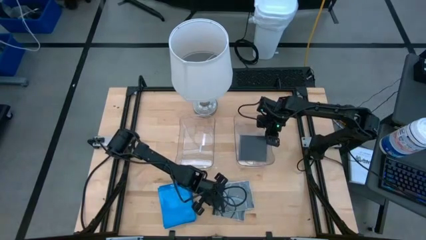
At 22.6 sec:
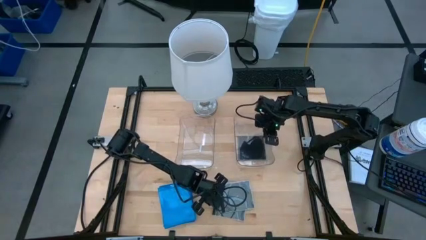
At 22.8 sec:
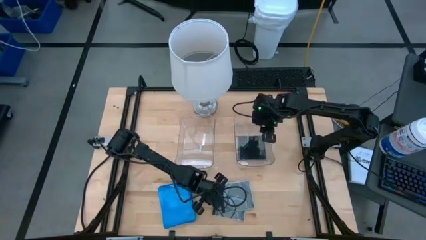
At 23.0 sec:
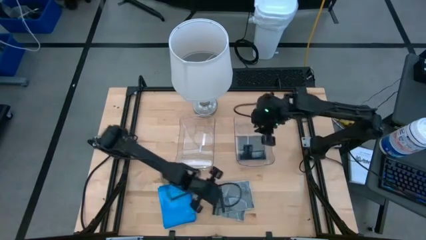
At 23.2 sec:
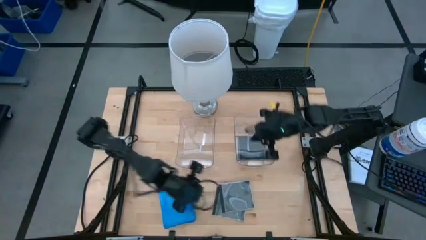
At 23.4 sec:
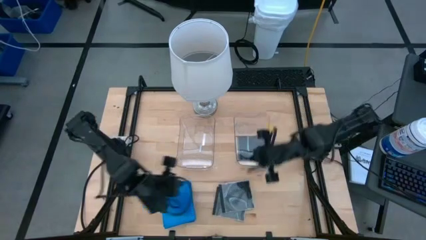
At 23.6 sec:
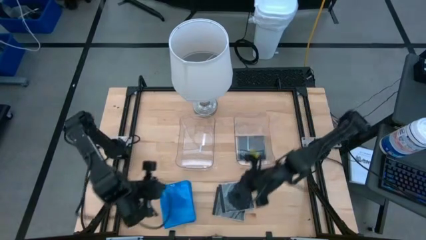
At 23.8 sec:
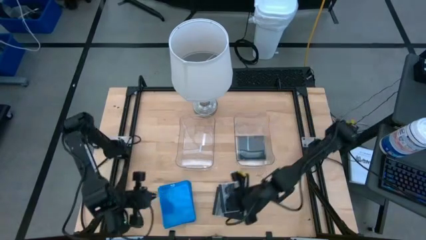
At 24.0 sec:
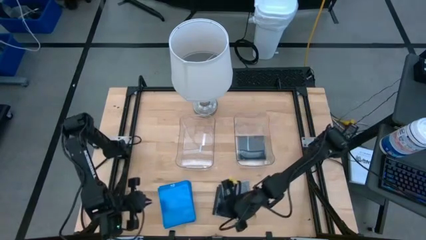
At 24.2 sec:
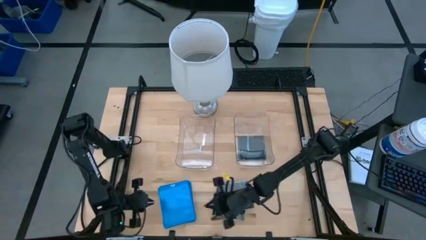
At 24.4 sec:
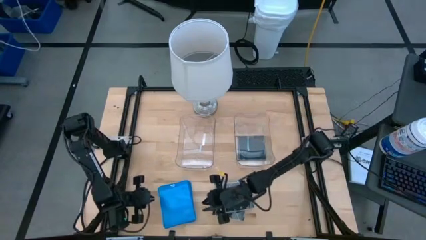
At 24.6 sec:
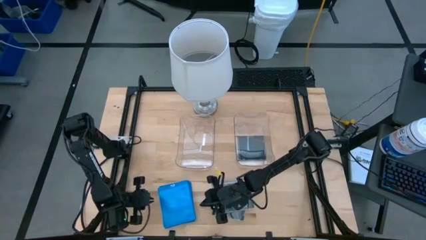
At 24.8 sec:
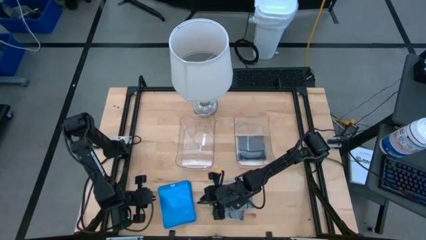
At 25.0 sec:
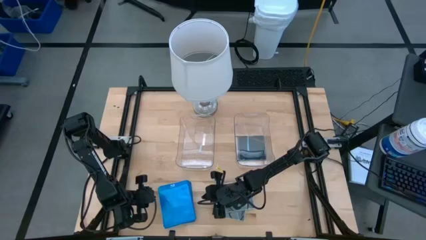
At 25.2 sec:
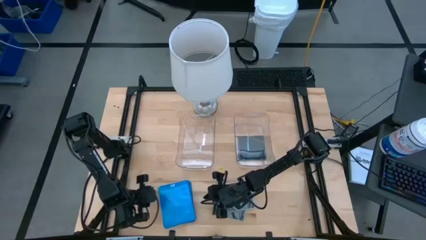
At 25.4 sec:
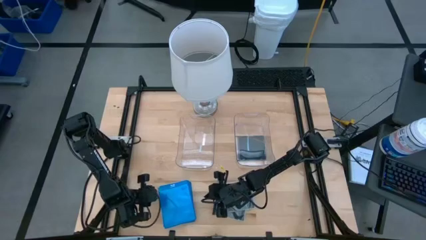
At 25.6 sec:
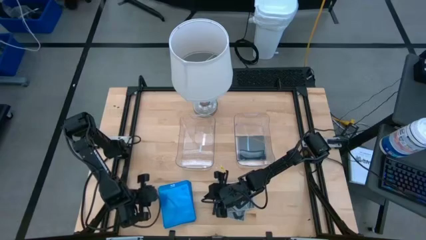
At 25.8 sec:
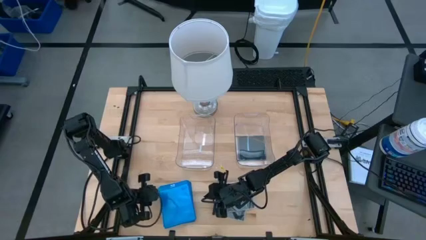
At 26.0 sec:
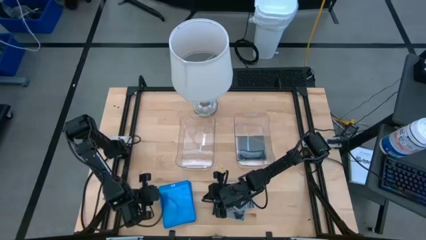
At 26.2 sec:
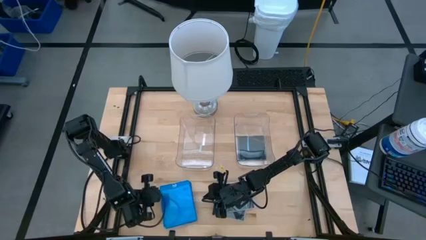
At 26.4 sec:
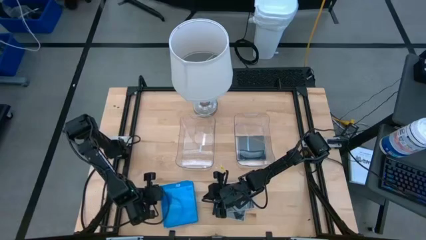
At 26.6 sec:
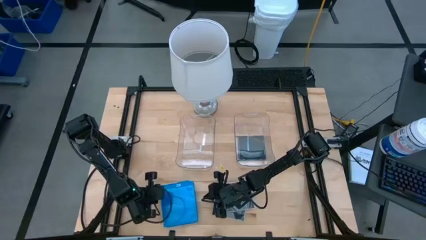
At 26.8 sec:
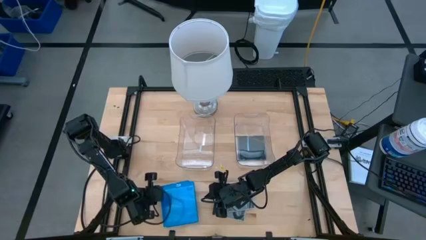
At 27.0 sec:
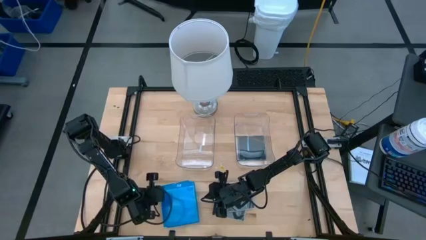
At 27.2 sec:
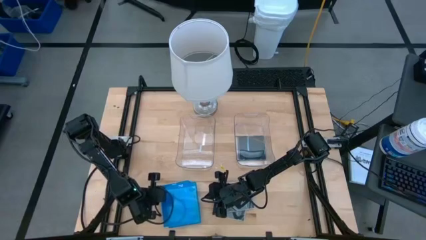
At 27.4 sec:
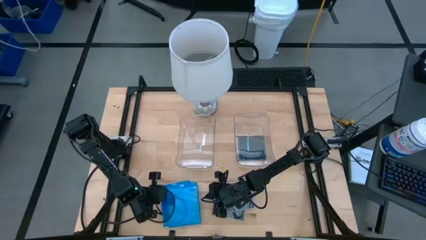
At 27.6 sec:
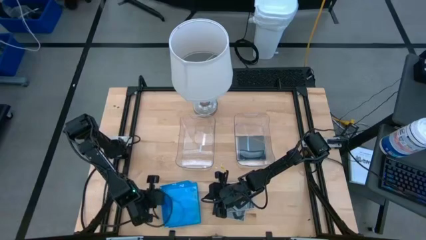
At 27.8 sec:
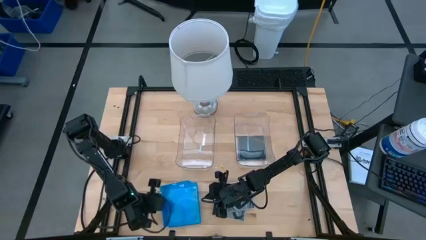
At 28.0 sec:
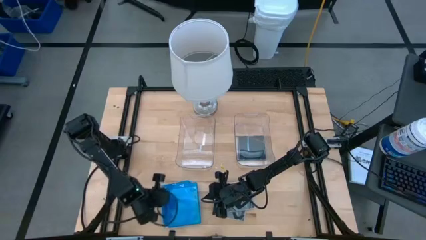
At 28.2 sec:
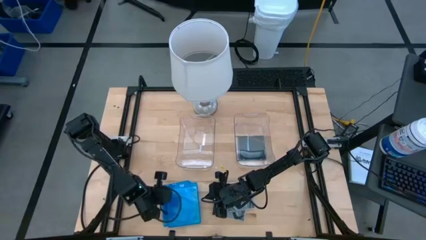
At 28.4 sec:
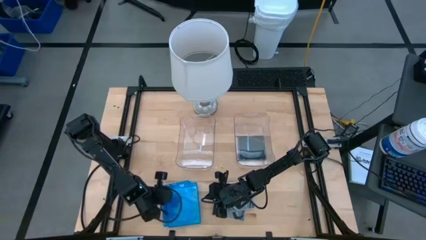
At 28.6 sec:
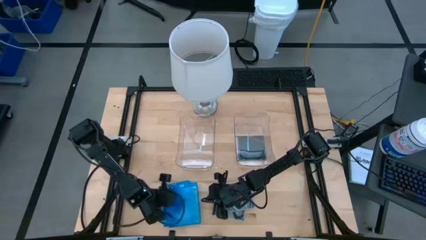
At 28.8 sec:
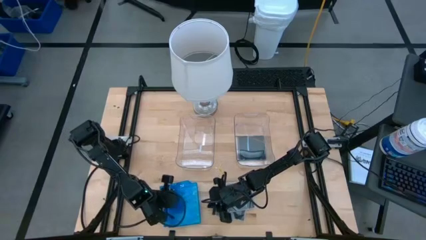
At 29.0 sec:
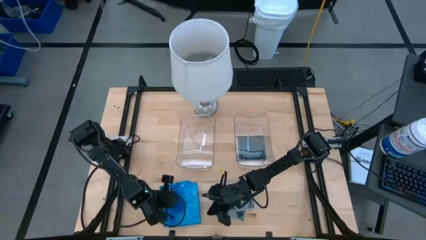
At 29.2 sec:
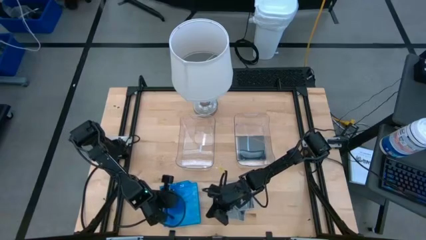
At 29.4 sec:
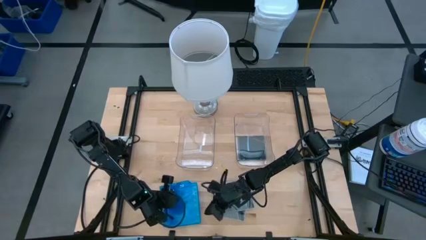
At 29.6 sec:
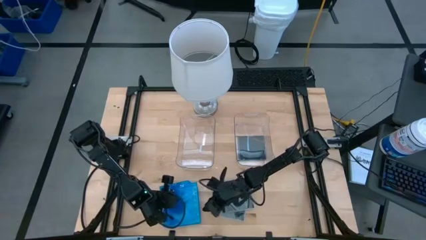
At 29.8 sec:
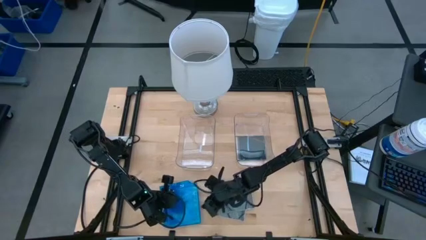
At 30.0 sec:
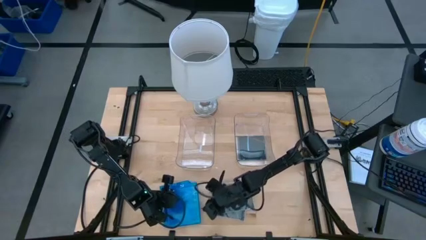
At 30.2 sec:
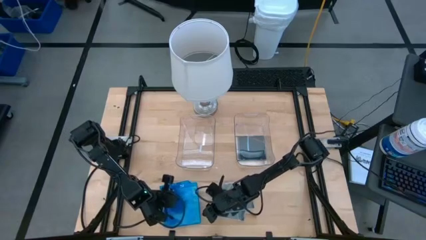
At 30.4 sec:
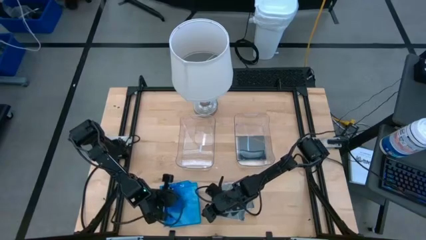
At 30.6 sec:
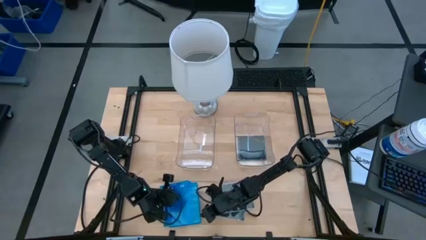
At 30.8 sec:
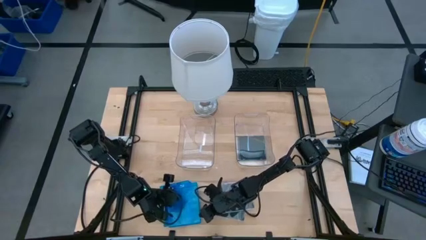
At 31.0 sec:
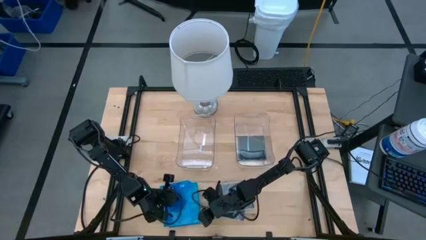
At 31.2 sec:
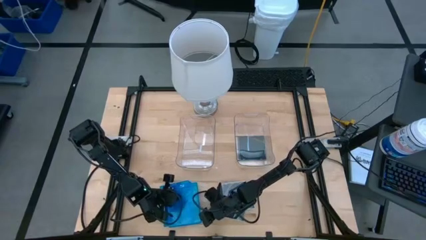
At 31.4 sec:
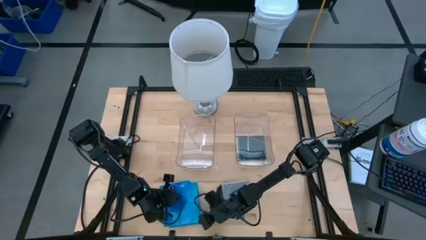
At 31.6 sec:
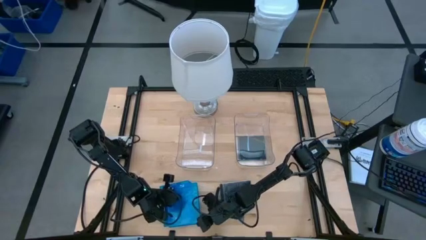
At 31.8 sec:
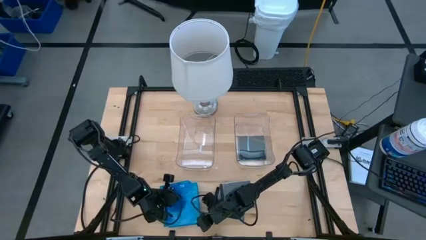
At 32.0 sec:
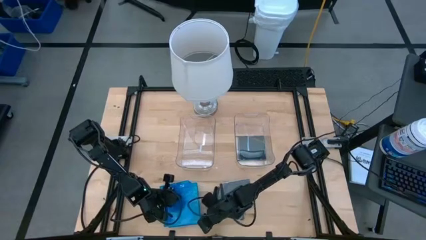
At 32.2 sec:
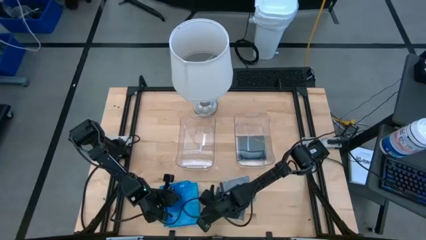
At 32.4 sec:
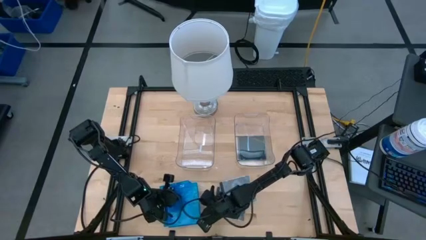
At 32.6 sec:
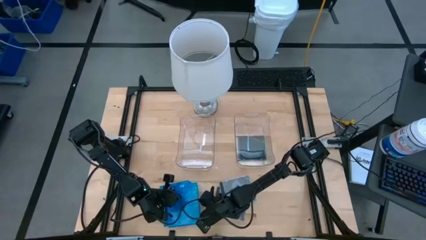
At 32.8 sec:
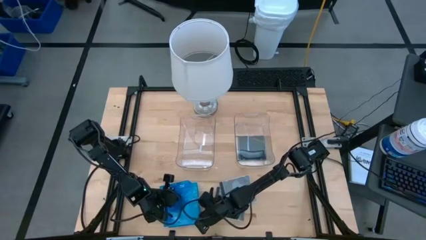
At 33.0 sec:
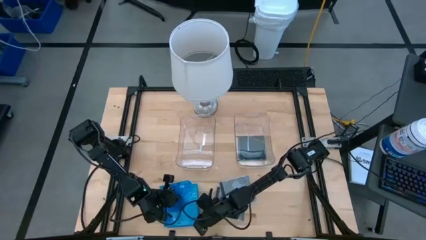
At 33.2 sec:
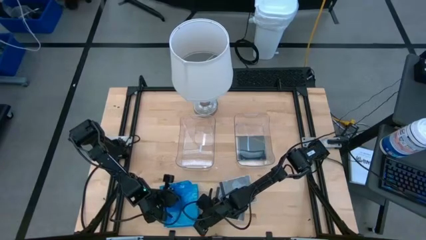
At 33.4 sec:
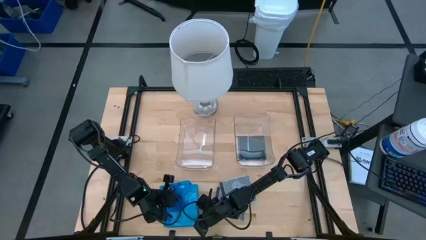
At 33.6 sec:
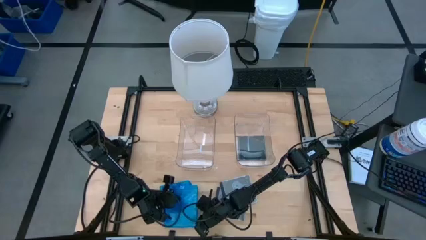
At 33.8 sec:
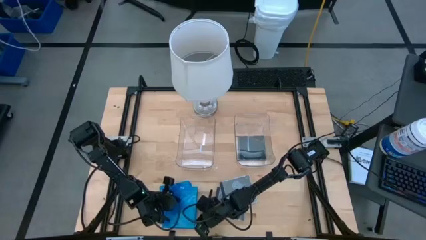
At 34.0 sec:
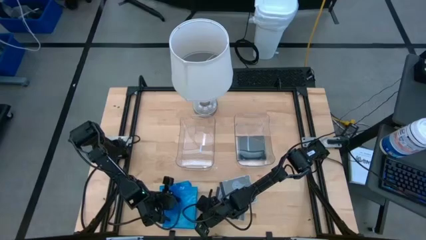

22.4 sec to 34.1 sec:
Task: Pick & place jewel cases by type
Put the blue CD case into the left transparent bin

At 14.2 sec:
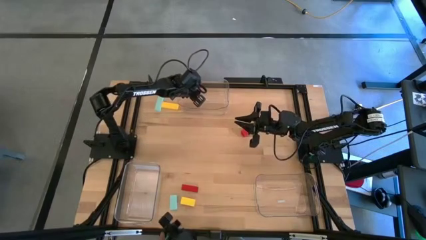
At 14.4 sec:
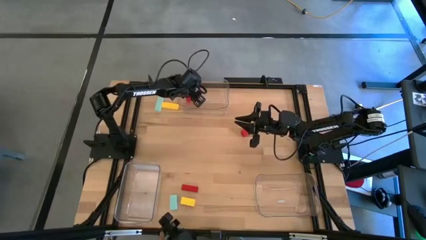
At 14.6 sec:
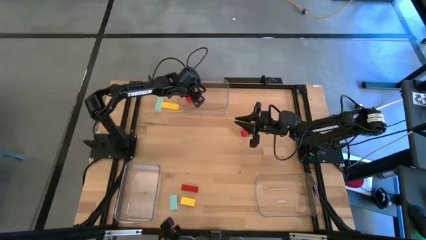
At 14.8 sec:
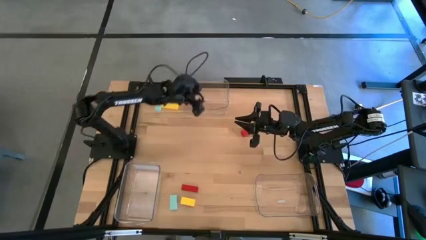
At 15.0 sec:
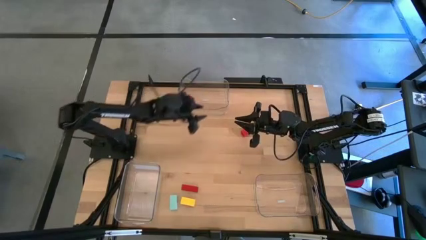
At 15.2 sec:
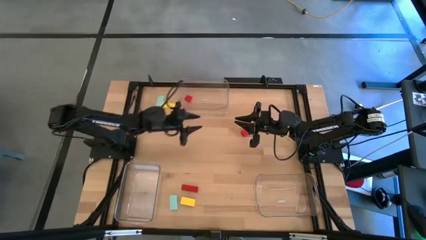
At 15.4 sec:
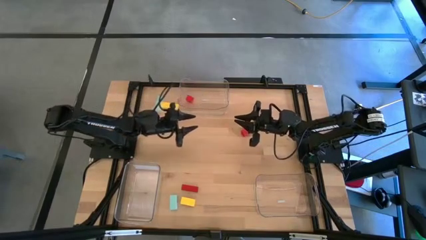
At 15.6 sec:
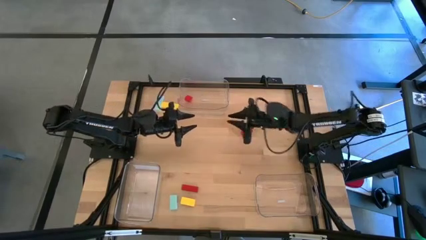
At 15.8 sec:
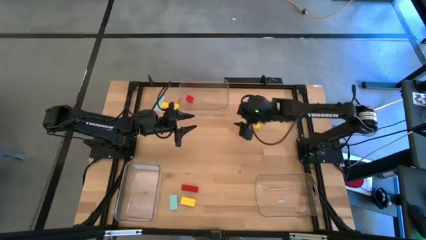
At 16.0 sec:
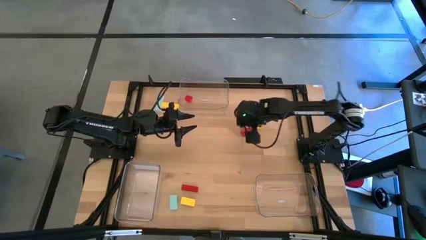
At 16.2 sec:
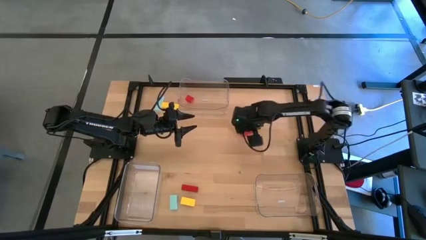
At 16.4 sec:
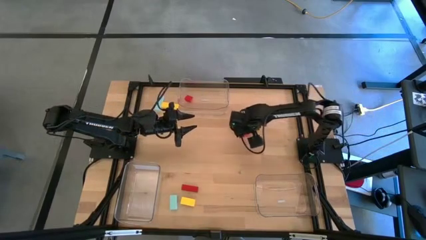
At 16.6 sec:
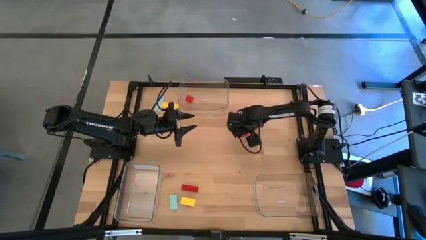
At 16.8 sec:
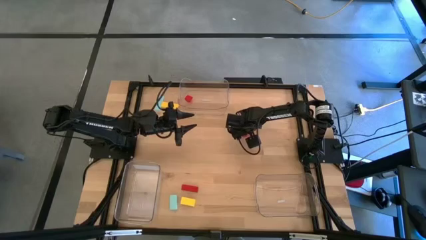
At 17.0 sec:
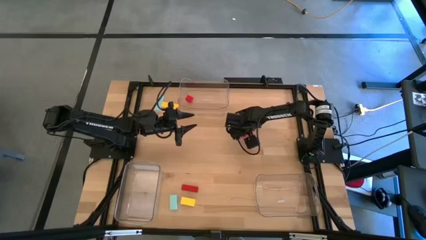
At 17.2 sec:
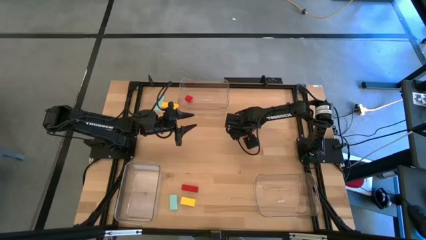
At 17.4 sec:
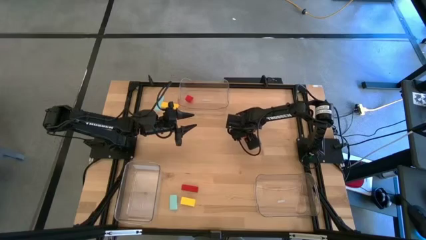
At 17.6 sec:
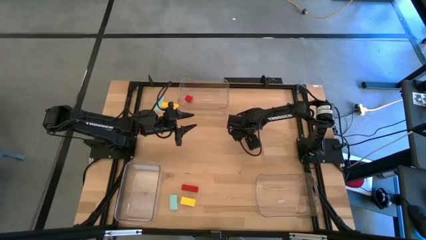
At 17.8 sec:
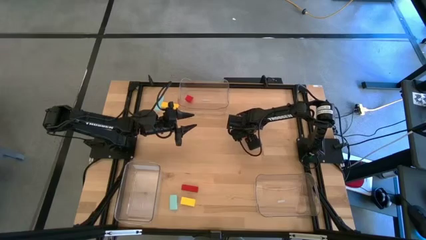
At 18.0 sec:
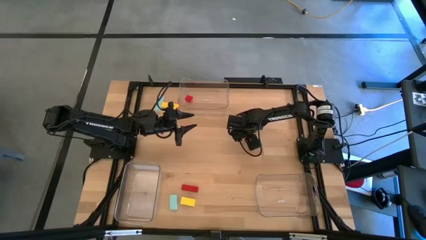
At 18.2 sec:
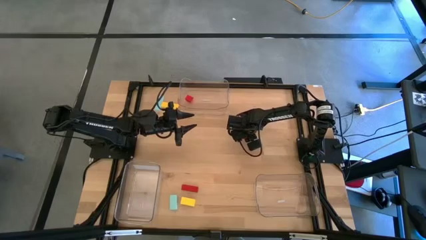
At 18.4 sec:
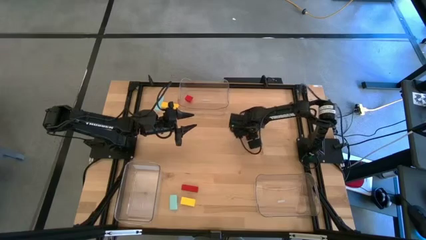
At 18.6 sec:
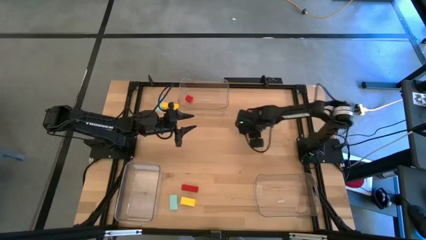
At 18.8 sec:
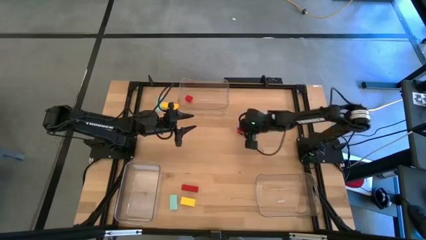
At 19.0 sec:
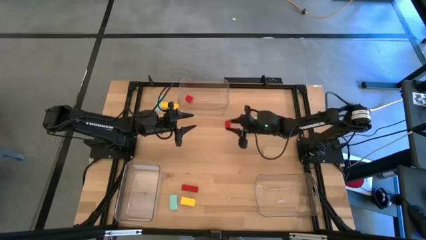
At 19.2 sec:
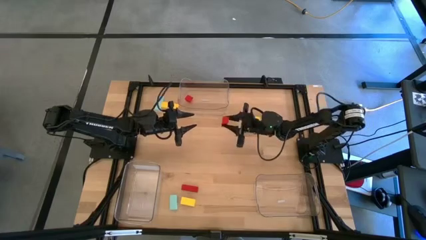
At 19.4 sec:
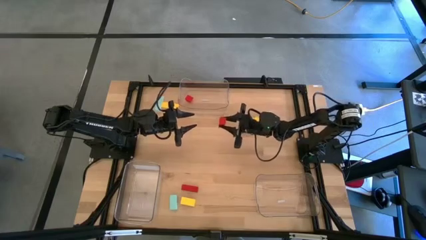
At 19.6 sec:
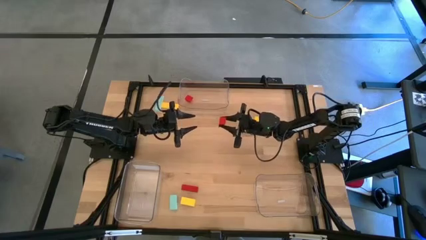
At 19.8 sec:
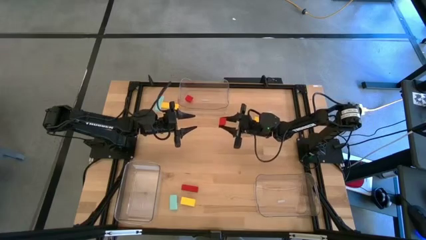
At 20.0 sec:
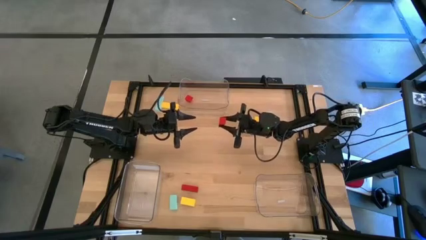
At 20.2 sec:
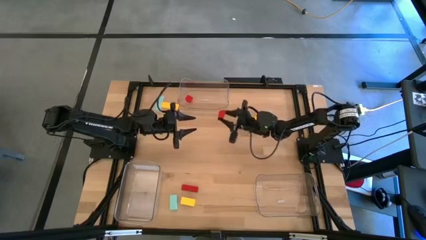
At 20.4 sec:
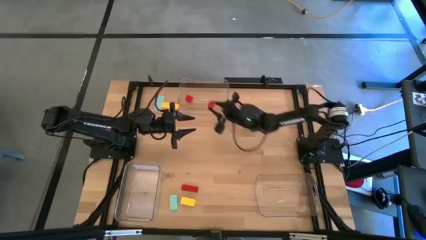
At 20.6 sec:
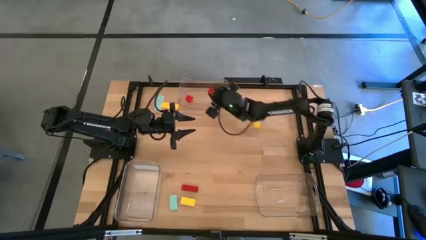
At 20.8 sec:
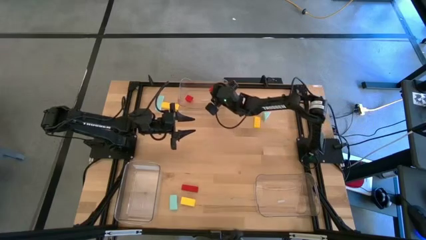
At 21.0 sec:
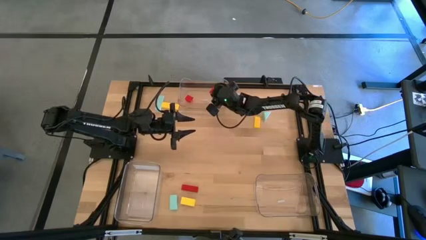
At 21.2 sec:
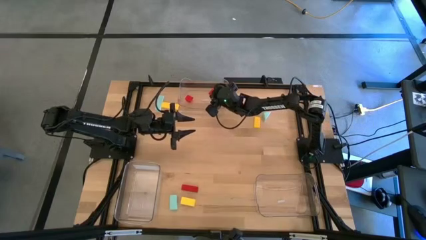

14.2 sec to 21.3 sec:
Task: Sort & place blocks by color
Put the top red block into the top transparent bin
